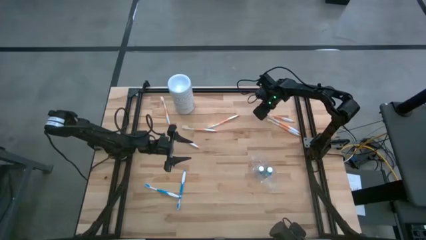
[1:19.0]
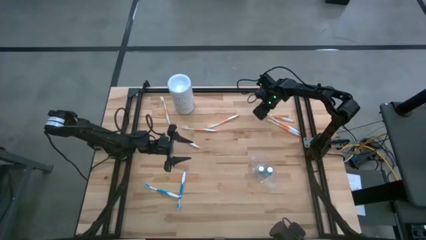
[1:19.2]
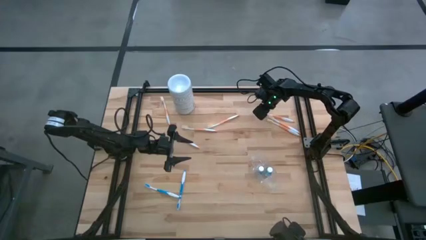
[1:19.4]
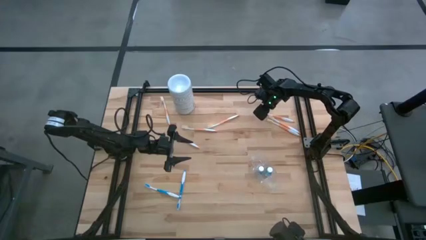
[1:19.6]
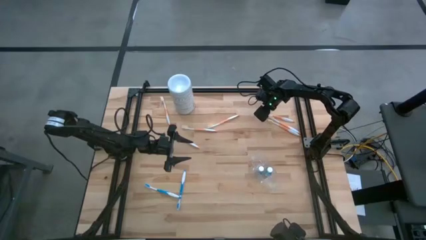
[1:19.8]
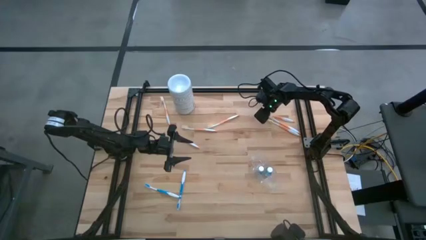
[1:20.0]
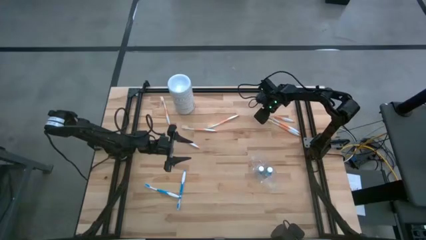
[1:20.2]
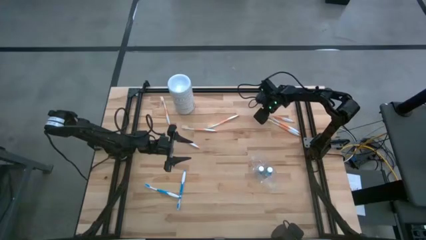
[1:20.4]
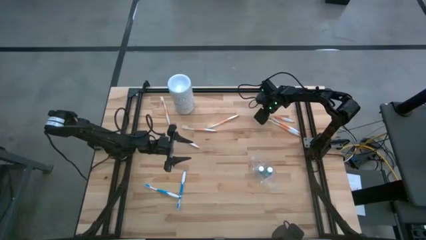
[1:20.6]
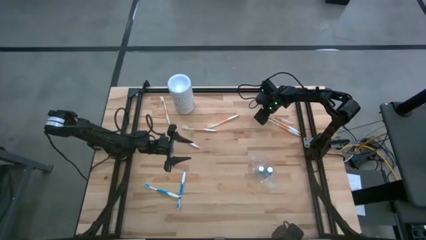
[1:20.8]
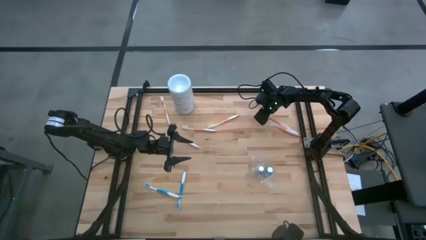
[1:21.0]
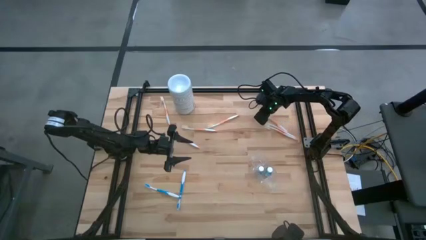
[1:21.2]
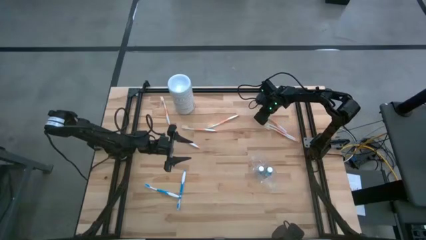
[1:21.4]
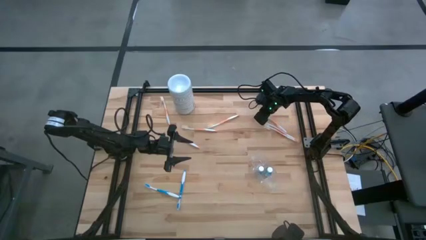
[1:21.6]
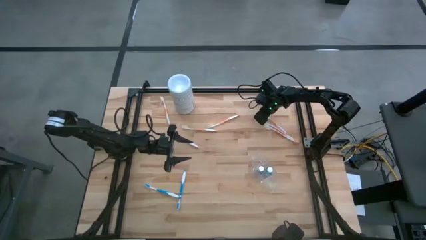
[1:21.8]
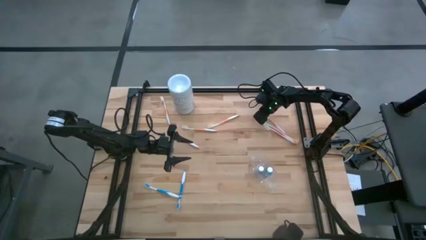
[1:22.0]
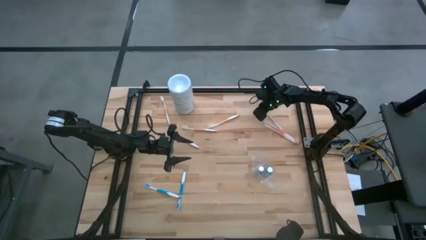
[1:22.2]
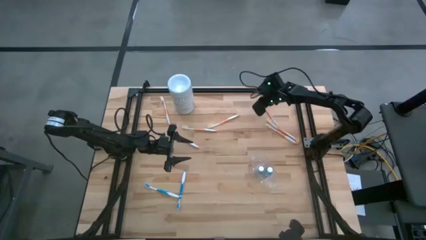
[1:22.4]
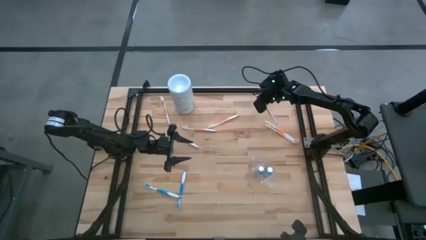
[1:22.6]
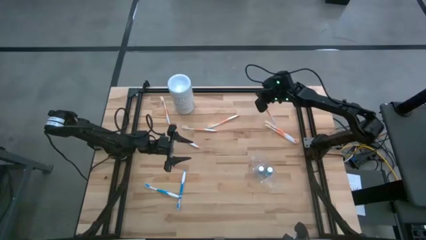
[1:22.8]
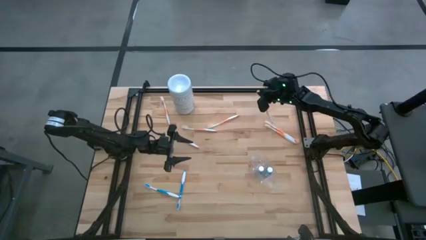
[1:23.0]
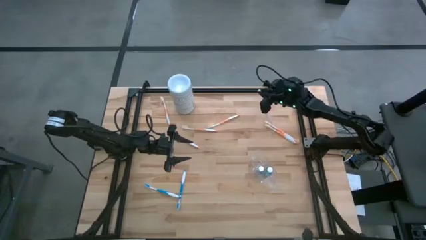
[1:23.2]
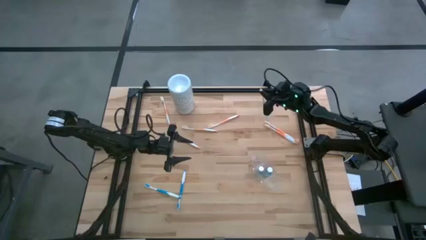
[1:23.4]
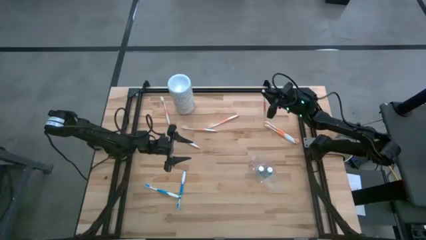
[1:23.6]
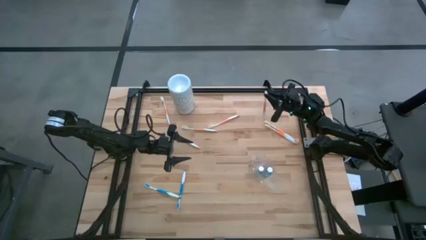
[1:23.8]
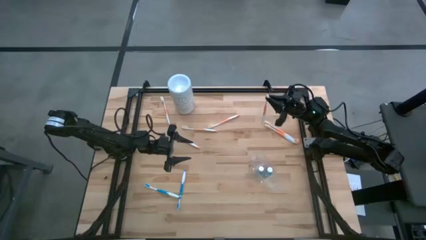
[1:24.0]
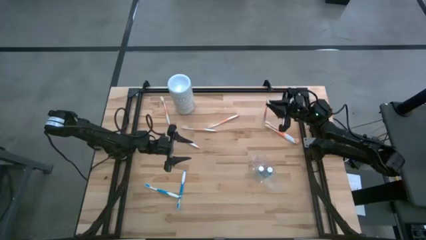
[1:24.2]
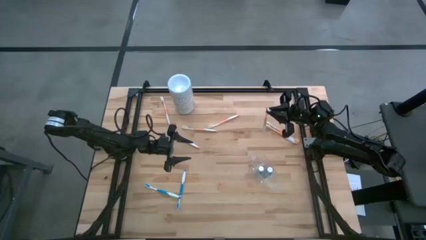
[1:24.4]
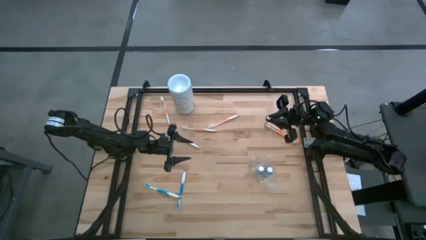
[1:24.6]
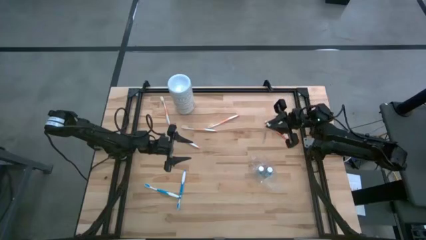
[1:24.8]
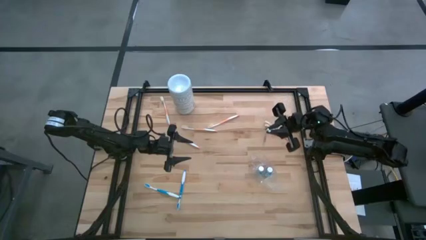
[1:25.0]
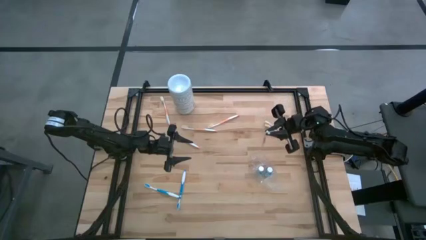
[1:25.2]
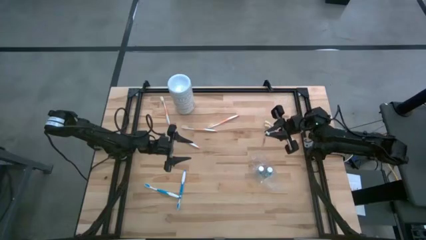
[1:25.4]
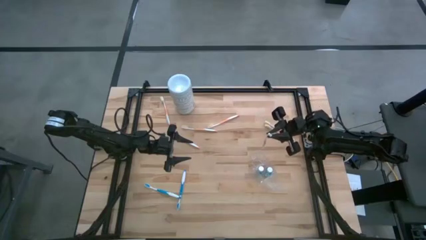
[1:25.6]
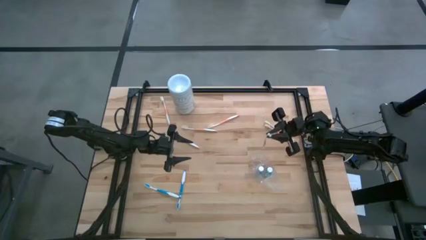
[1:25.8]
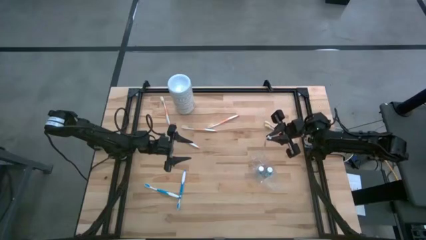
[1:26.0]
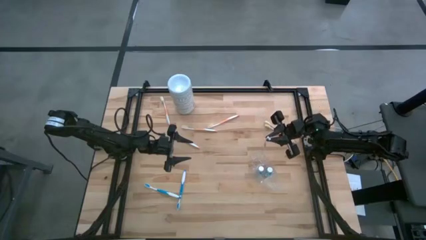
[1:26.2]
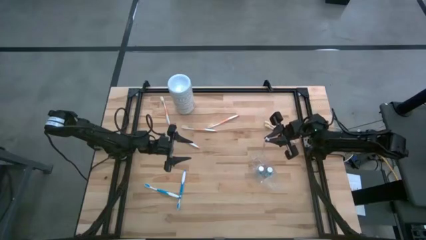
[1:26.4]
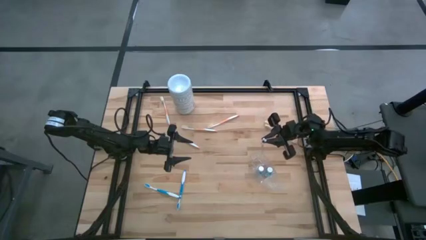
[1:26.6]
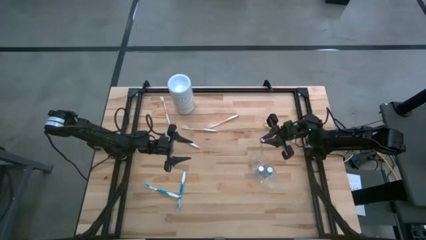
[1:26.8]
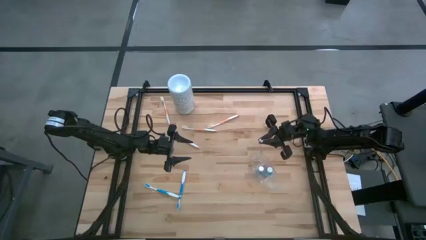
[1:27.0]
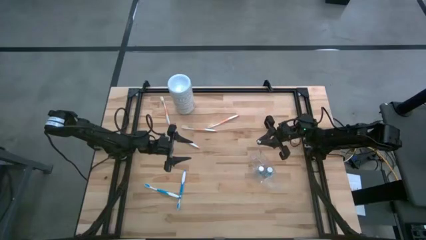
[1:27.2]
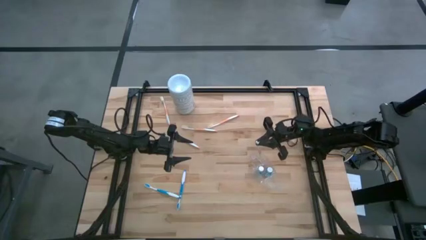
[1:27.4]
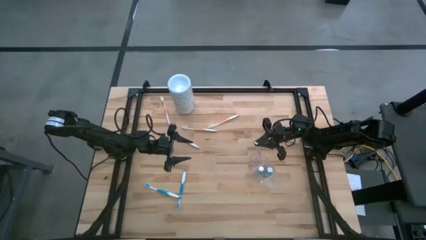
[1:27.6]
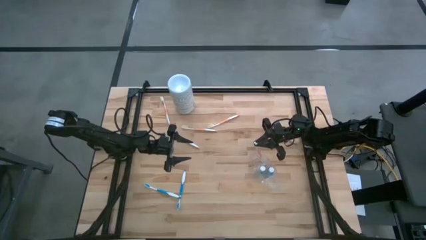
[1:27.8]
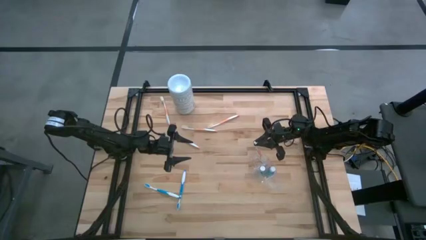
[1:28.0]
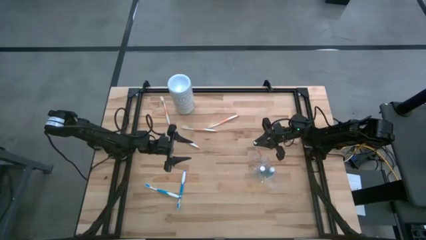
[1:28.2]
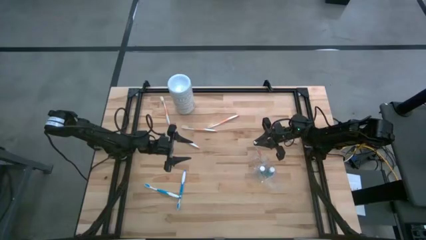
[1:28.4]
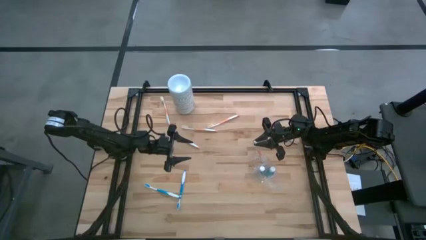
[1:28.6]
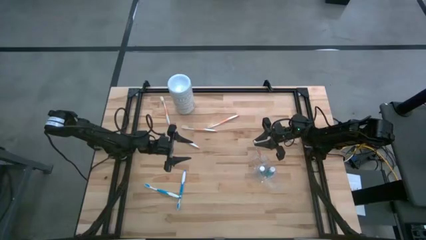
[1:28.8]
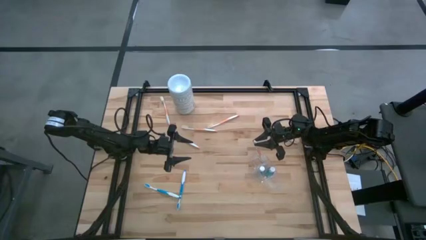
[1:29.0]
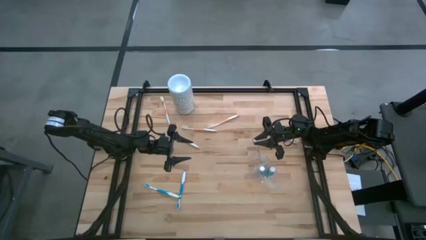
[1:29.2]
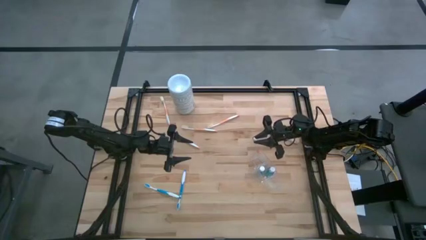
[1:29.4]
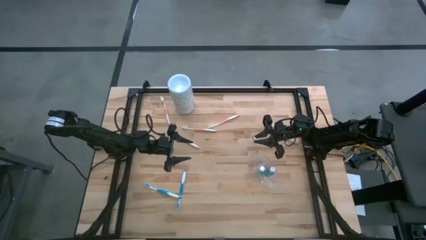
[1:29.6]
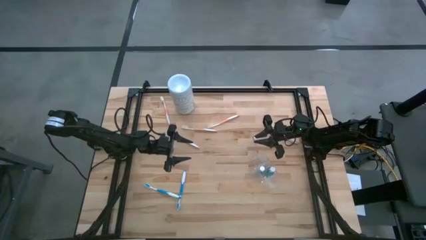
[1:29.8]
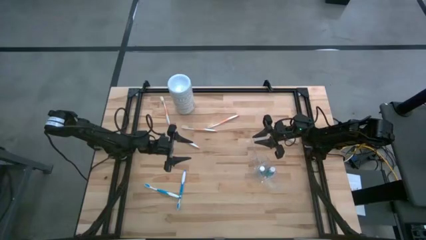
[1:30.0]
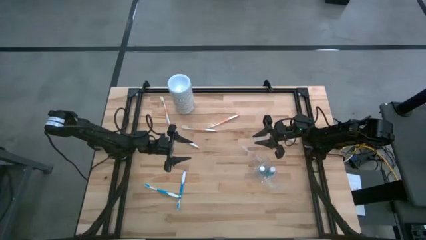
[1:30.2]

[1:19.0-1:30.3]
Task: Pick & Place toothbrushing station
Put the orange toothbrush into the top section of the transparent organizer

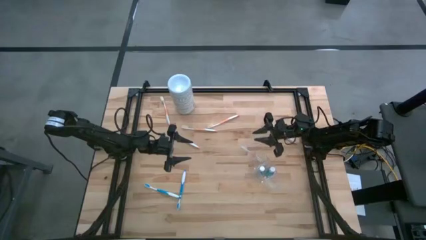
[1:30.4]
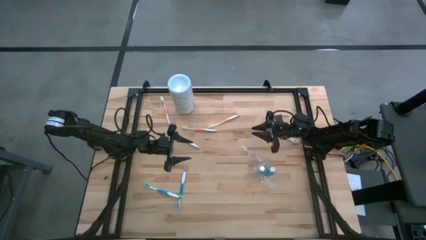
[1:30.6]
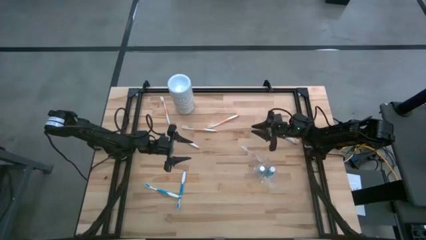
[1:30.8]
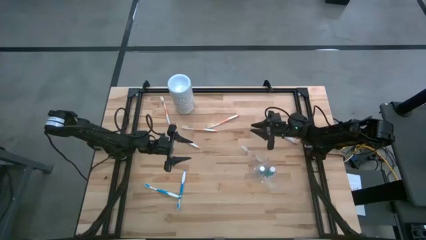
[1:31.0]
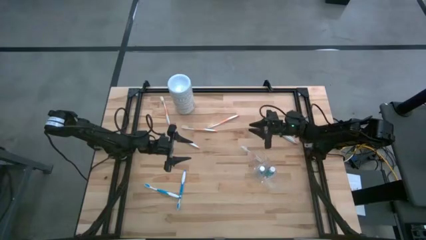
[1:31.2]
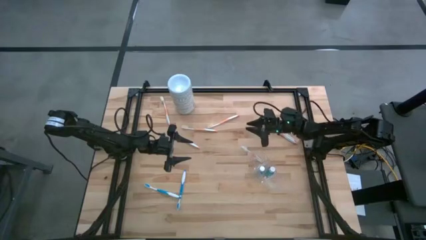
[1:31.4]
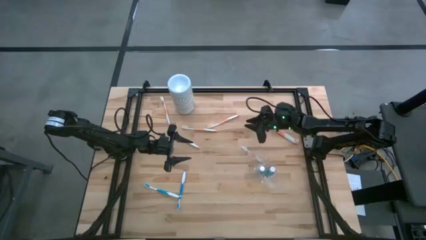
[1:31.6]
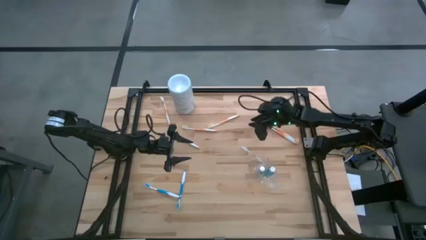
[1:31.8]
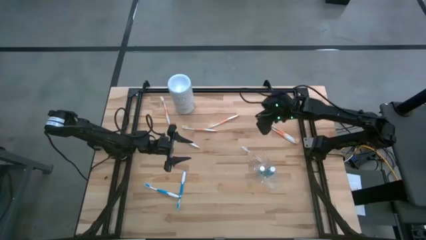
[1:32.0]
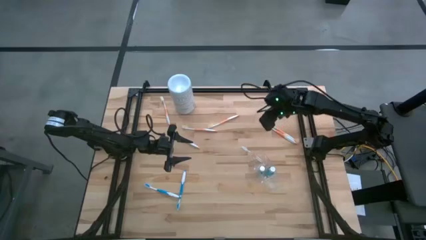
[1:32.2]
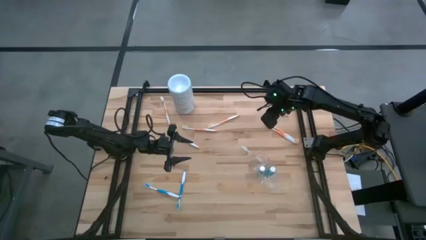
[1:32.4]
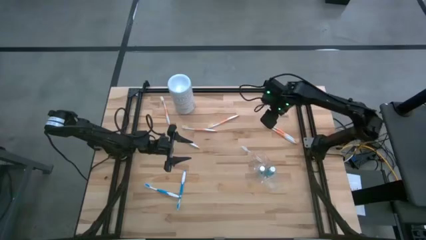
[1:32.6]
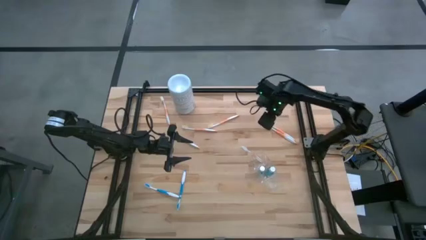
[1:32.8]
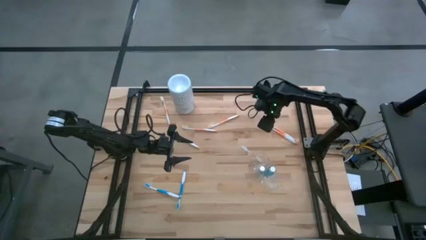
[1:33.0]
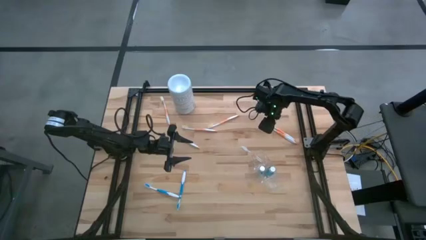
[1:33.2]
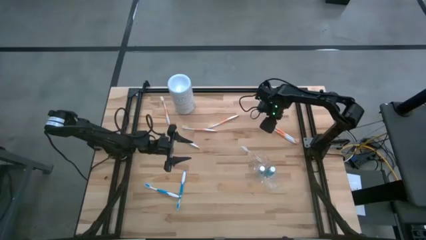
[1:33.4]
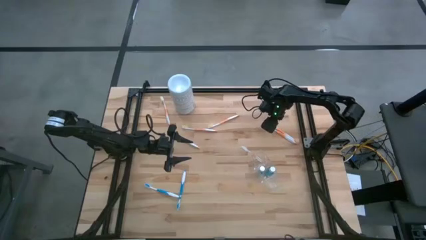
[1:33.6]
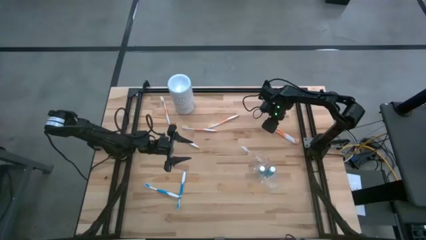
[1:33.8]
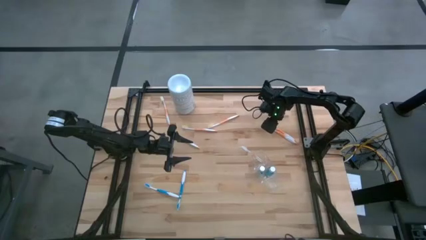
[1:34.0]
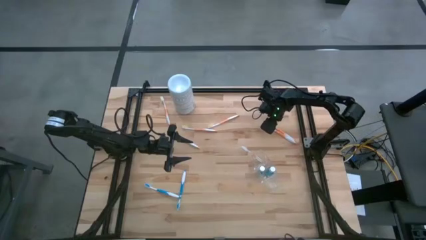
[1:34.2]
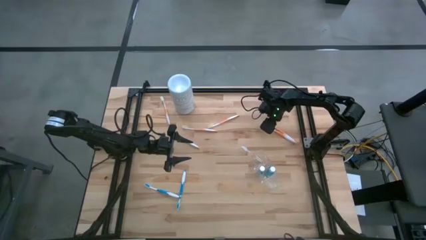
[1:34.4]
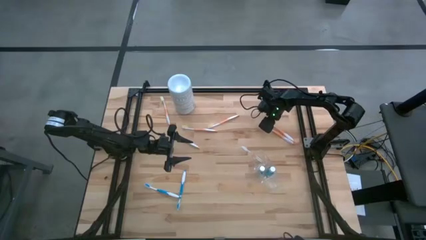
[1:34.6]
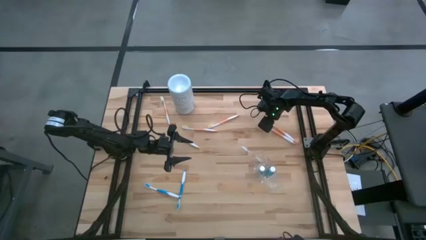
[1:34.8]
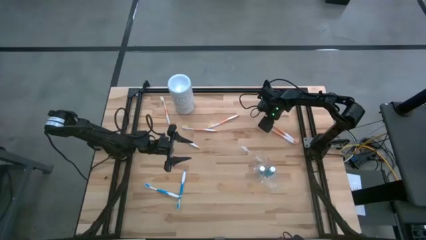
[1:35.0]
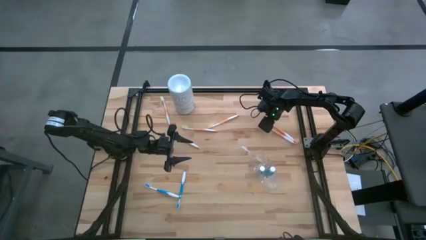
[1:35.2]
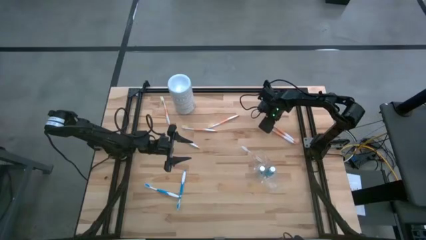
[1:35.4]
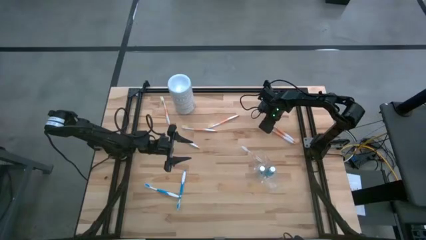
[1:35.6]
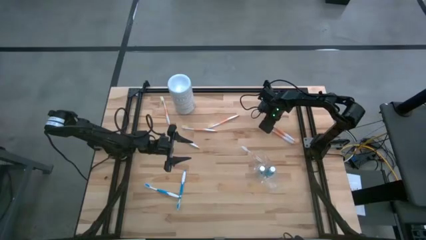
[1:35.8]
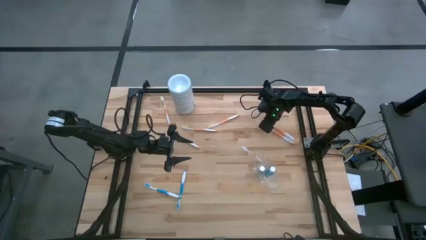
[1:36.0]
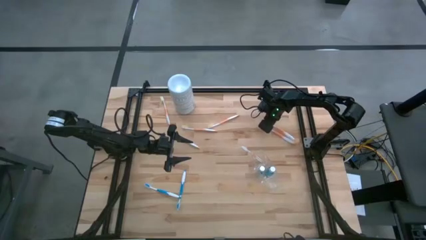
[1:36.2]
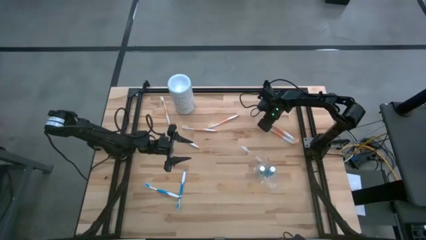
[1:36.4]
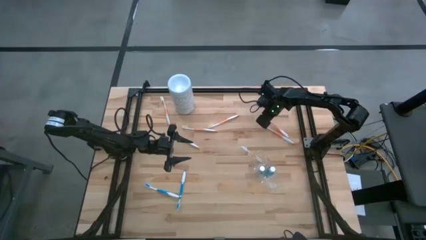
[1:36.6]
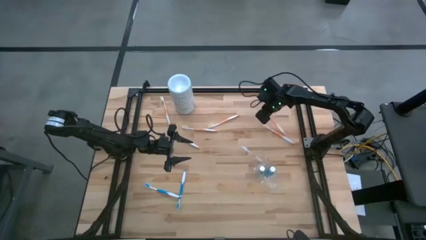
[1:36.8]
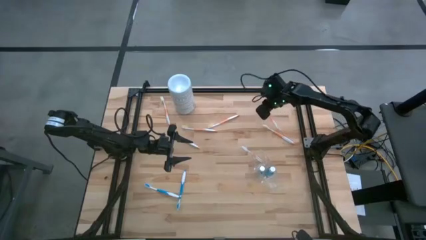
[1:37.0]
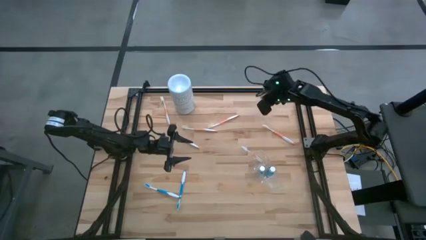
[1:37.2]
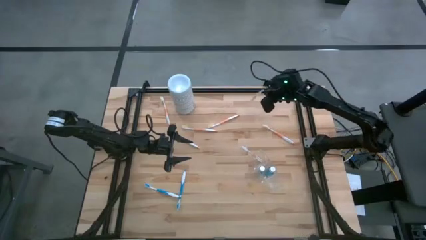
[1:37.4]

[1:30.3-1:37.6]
Put the orange toothbrush into the top section of the transparent organizer
